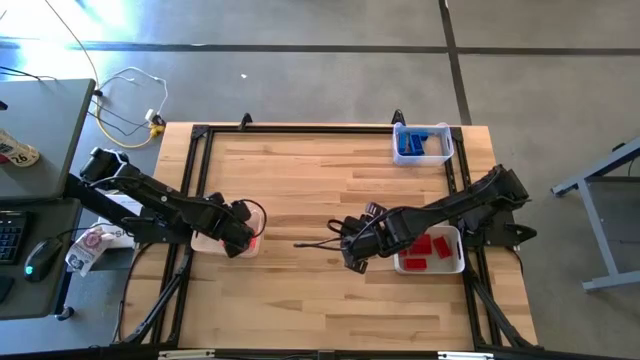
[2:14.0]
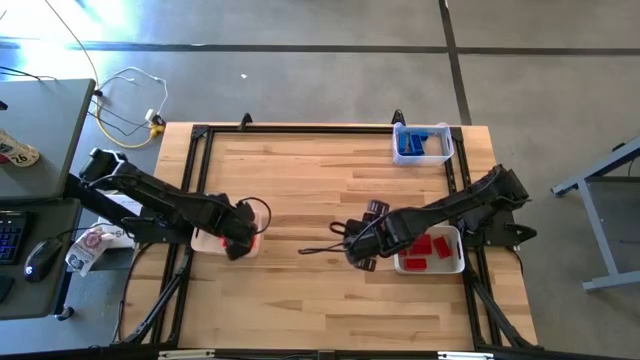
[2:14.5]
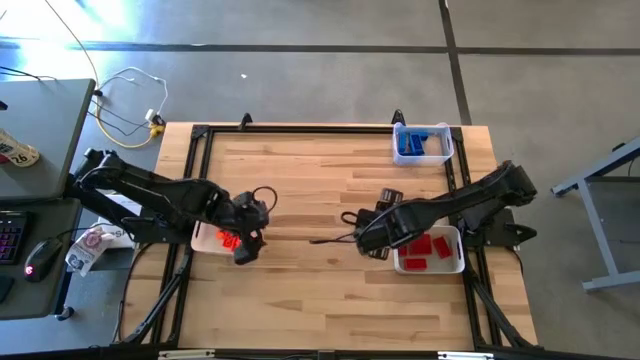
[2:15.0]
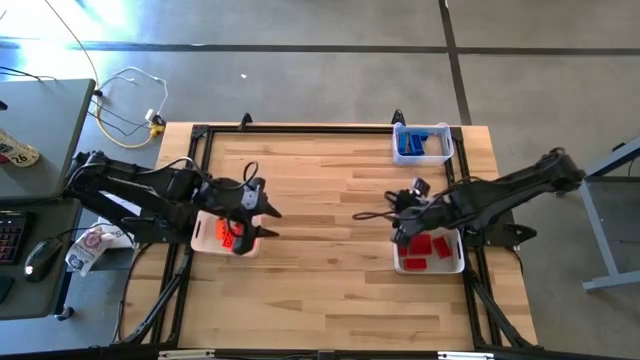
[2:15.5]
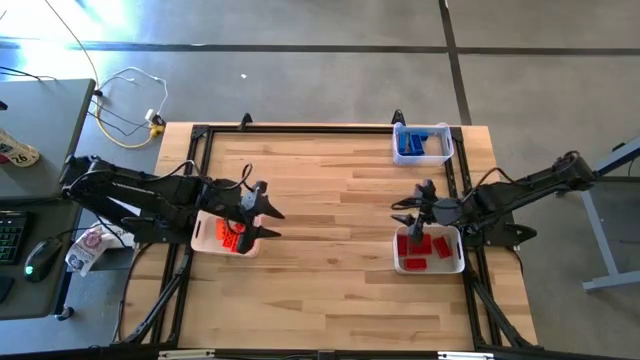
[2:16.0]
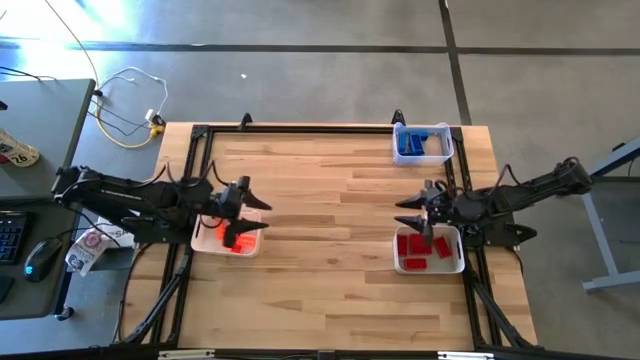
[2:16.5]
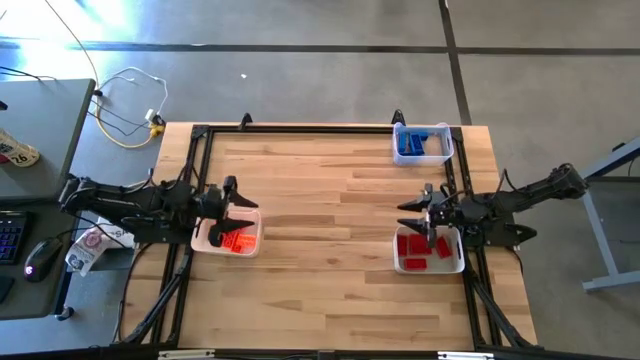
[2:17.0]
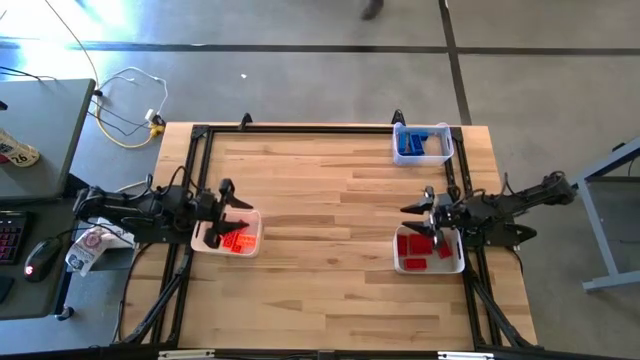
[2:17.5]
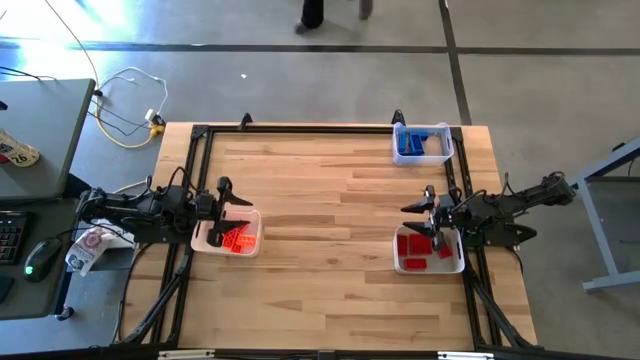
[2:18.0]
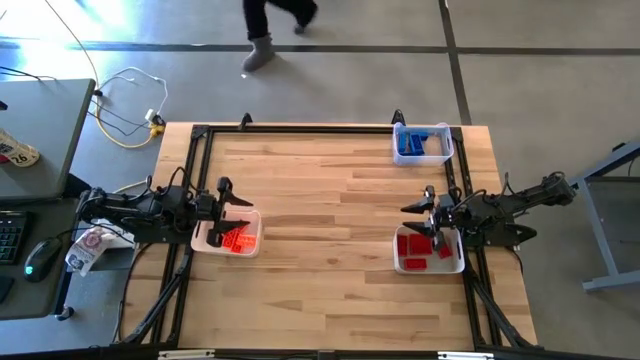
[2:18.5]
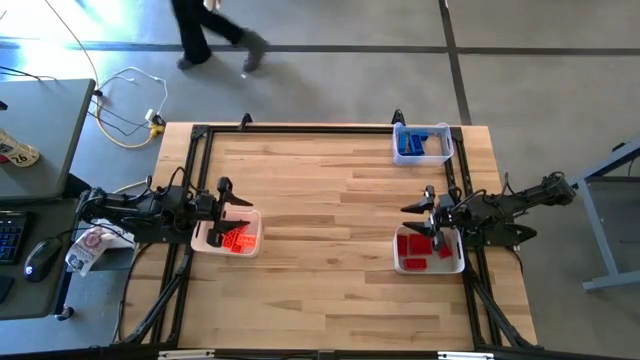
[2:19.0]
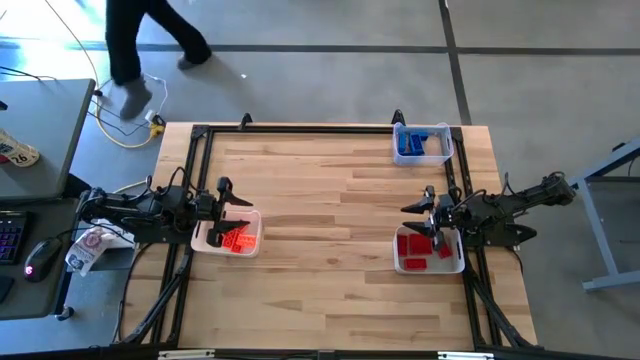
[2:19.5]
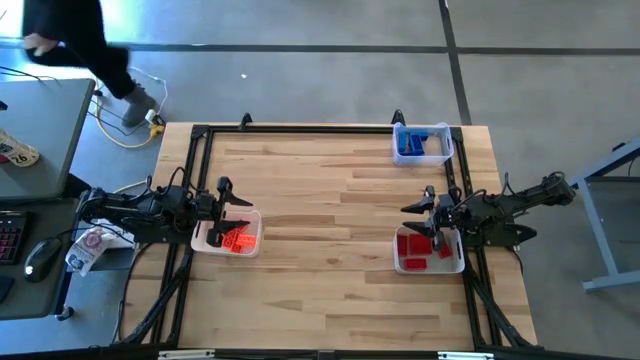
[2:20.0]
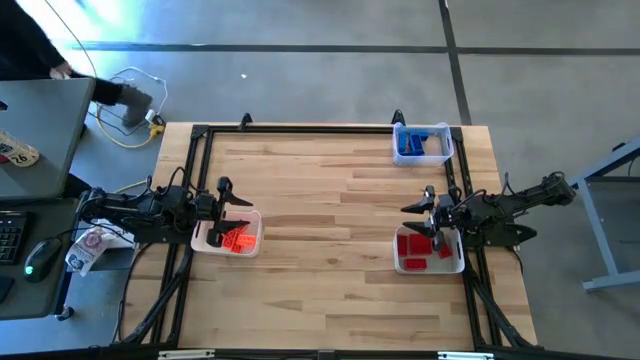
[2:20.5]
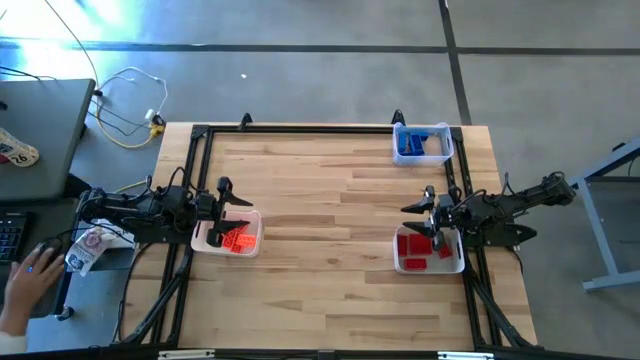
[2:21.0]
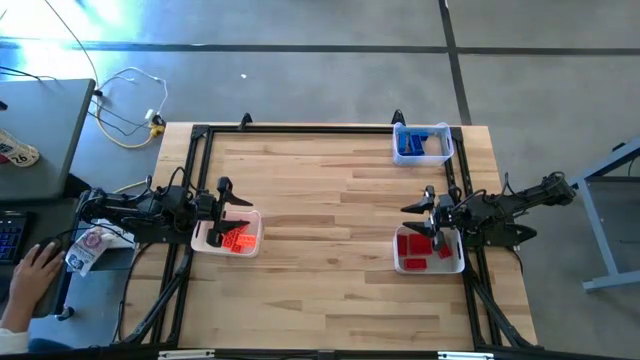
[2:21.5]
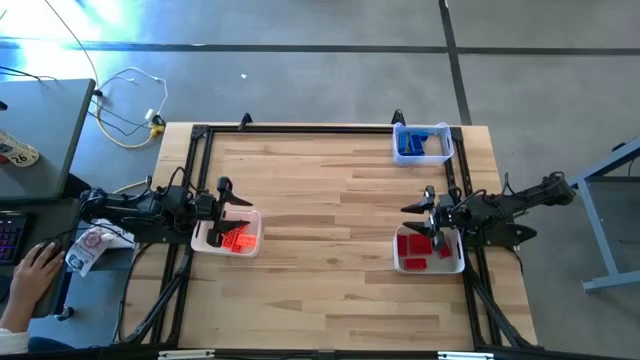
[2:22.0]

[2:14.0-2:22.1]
Task: Sort & place blocks by color
Return to Home Position

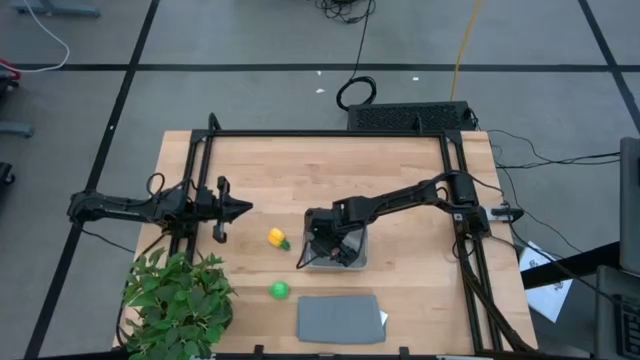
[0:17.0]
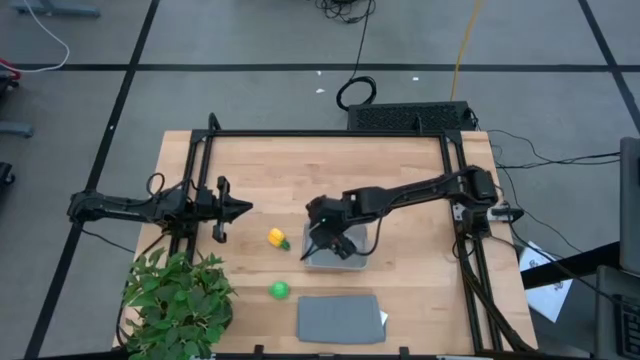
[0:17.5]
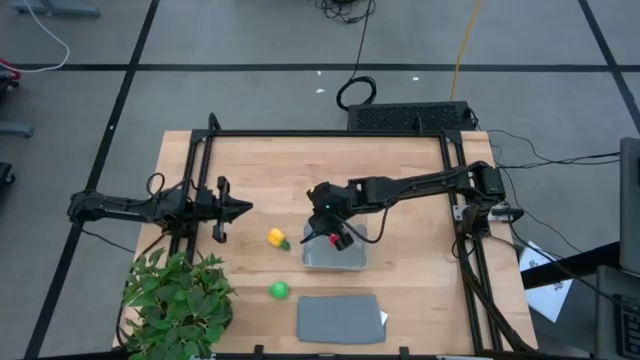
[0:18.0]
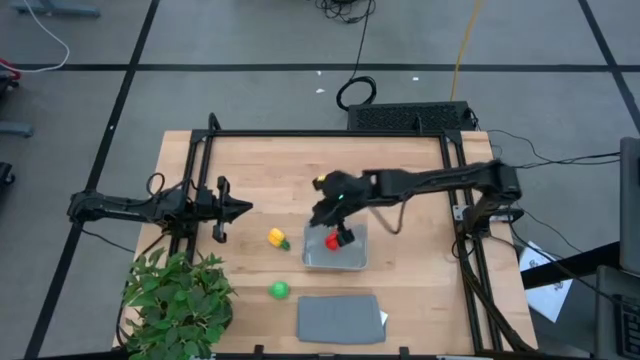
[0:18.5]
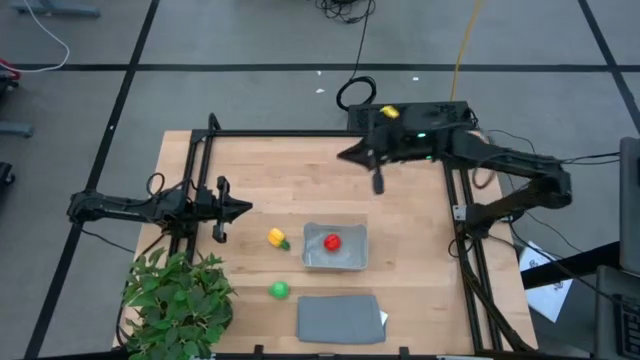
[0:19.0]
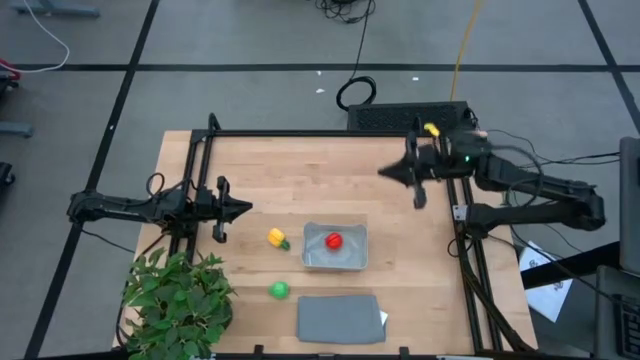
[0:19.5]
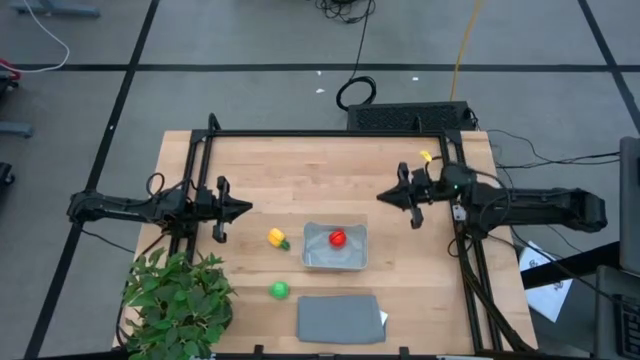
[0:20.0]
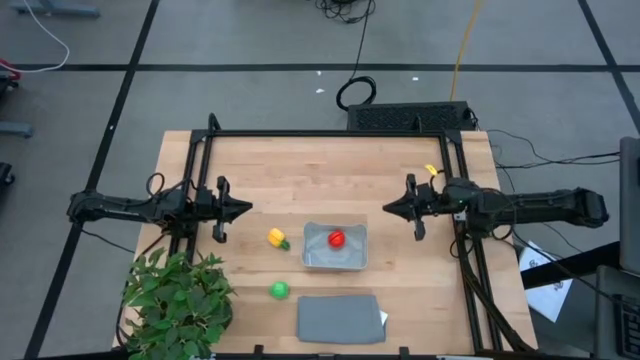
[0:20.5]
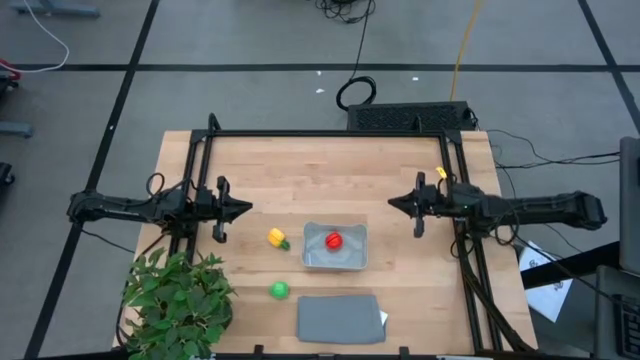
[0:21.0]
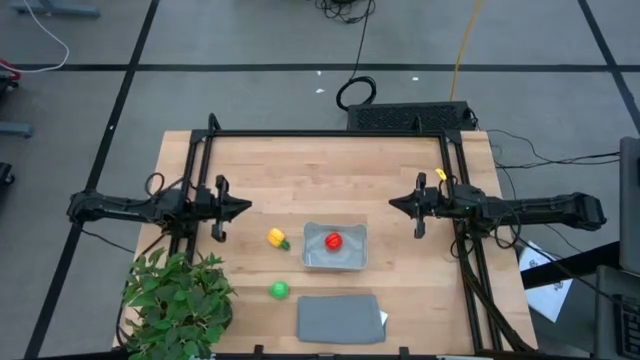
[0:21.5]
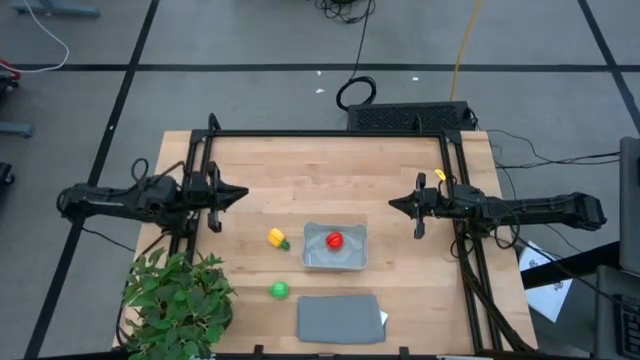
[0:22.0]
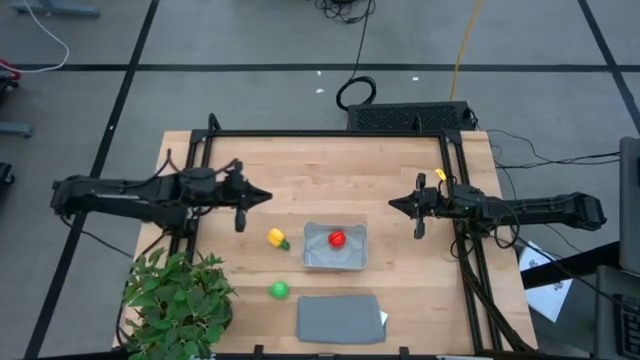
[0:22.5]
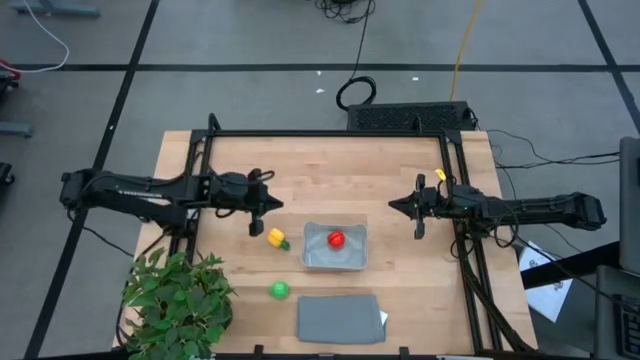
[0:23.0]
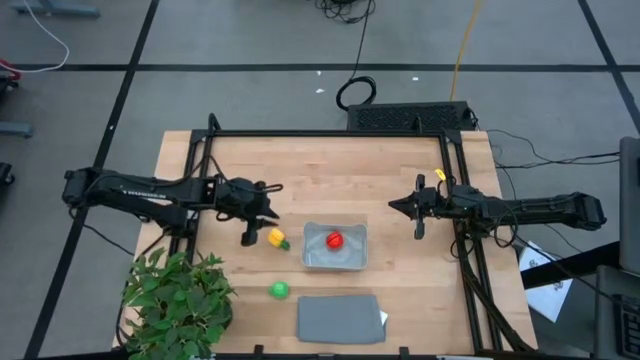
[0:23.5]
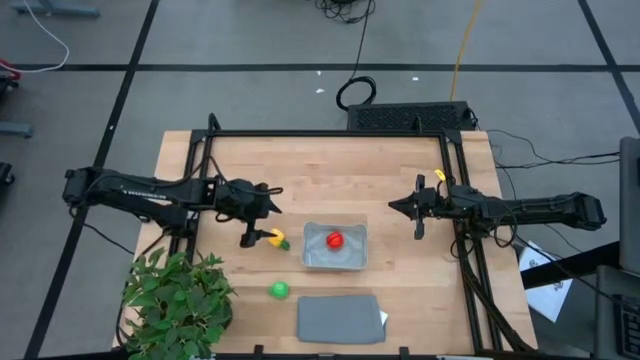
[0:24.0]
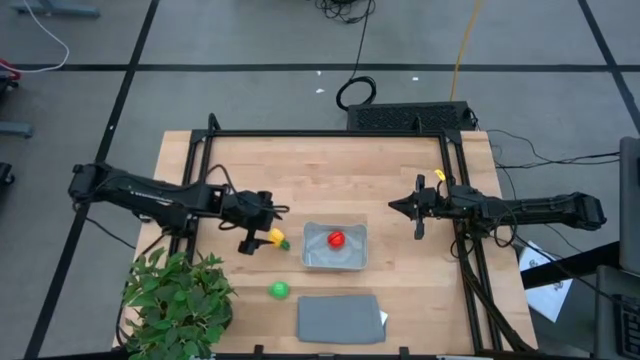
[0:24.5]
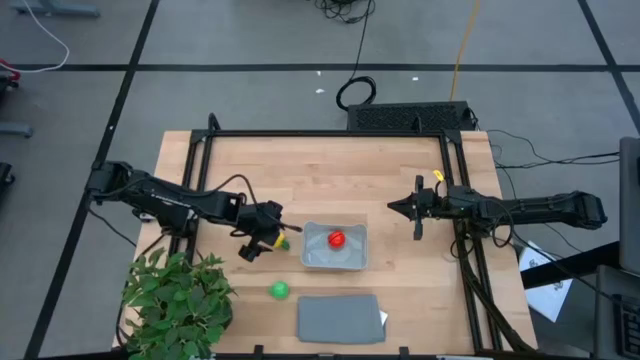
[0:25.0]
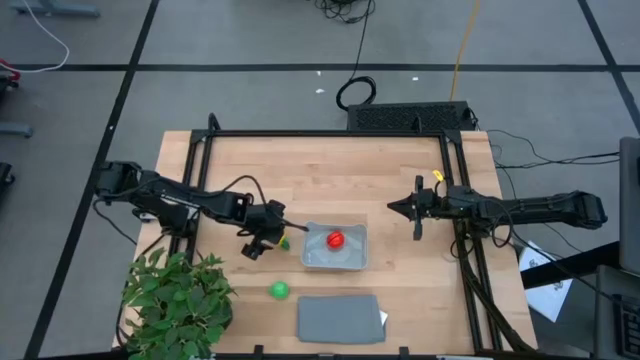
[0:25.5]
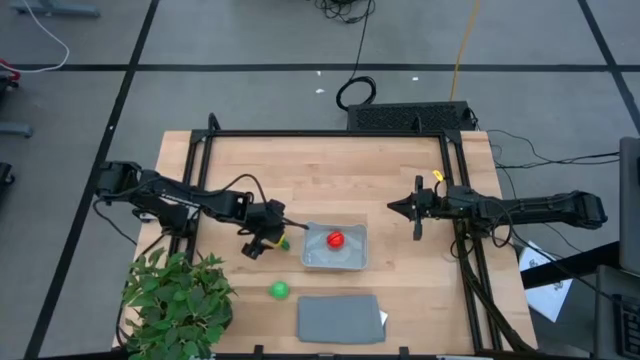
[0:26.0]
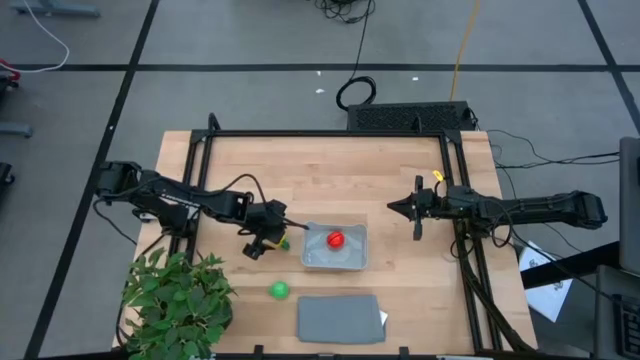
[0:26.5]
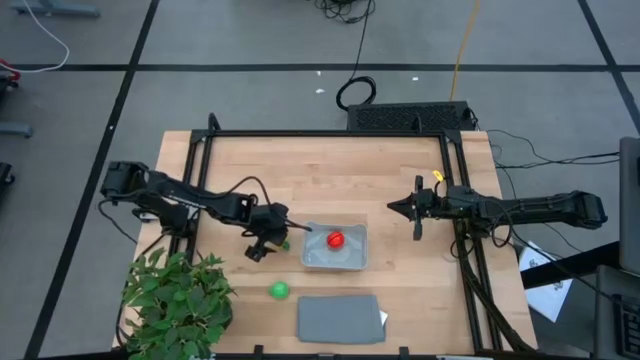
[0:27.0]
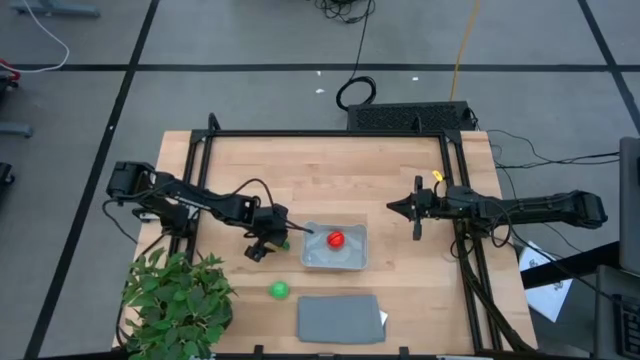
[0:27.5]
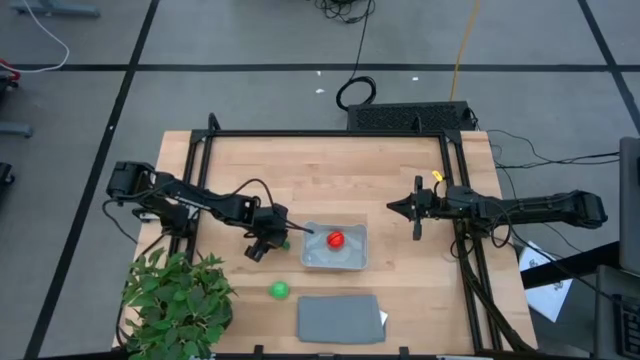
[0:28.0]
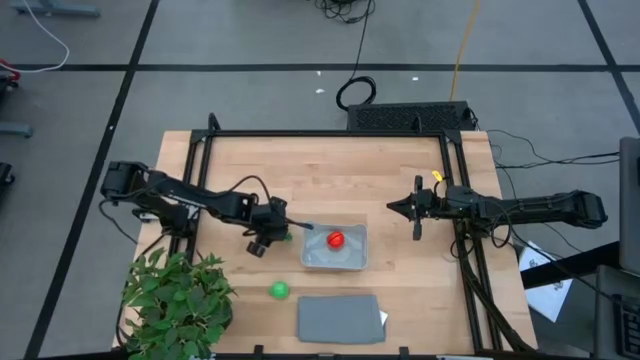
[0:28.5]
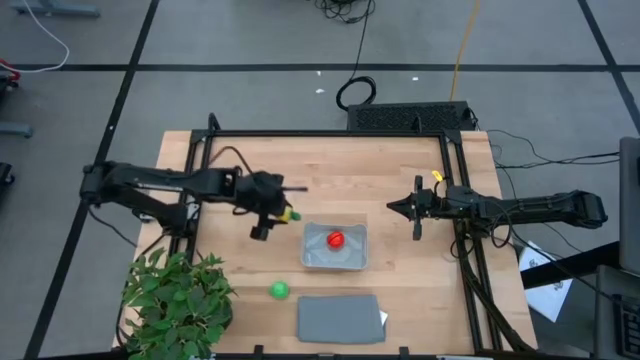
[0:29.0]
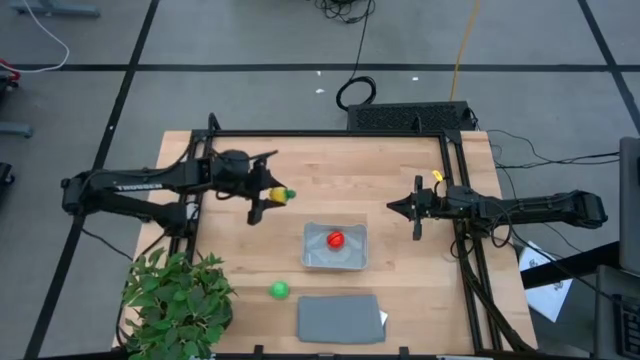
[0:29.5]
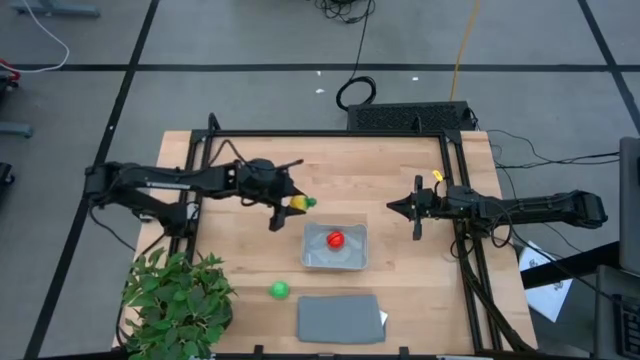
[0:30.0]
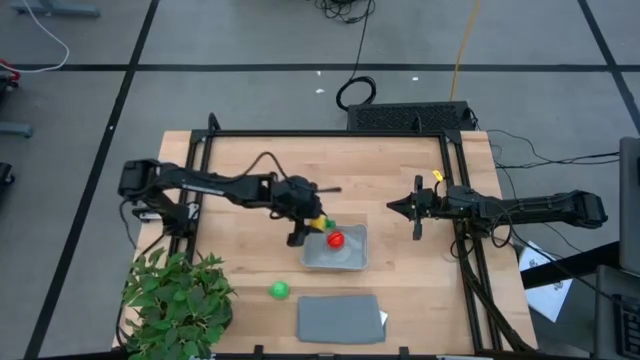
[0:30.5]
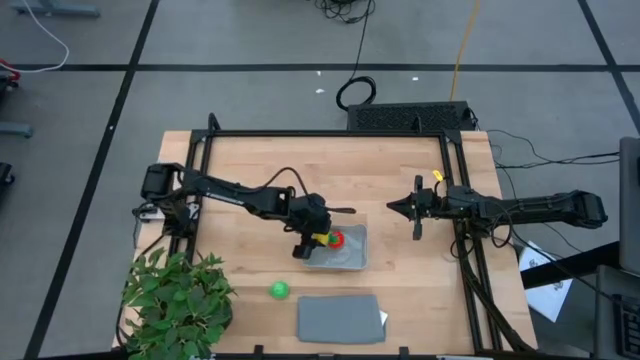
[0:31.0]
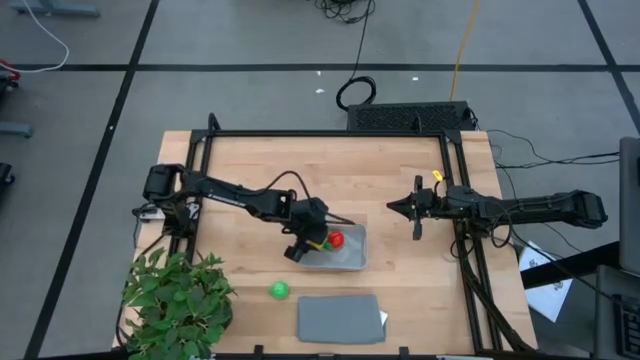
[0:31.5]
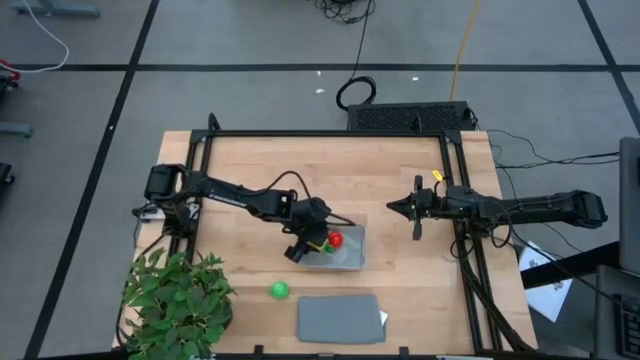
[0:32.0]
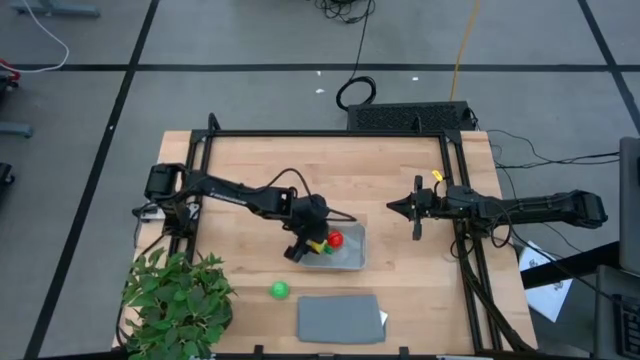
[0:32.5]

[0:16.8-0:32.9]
Task: Pick and placing Produce into tupperware
Put the yellow pineapple into the gray bin
